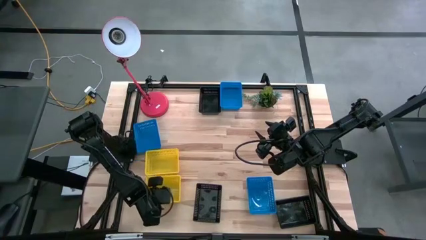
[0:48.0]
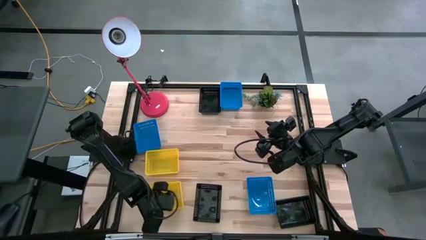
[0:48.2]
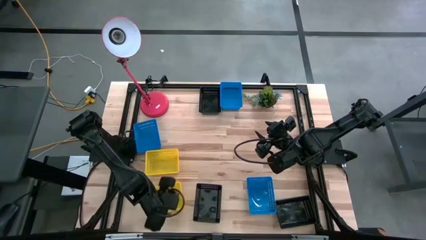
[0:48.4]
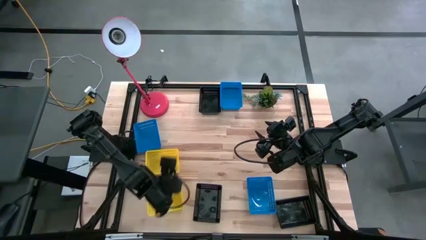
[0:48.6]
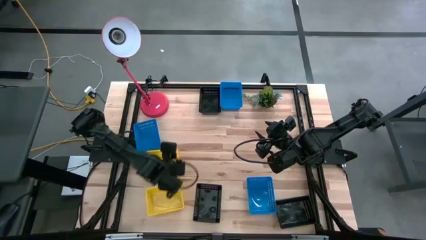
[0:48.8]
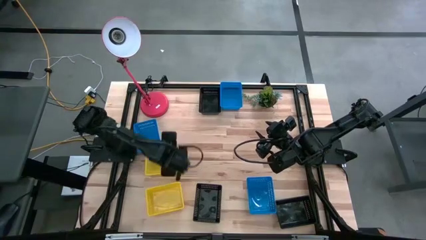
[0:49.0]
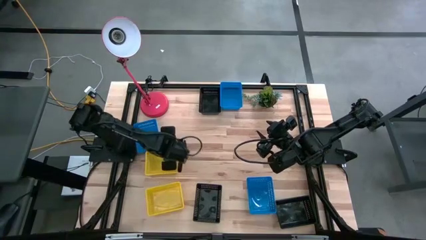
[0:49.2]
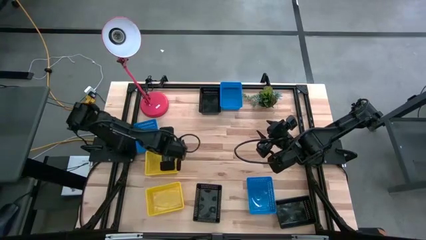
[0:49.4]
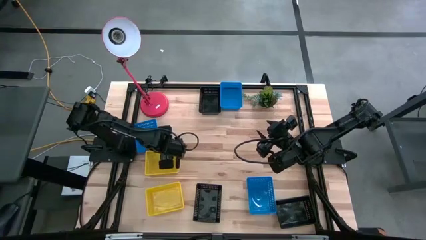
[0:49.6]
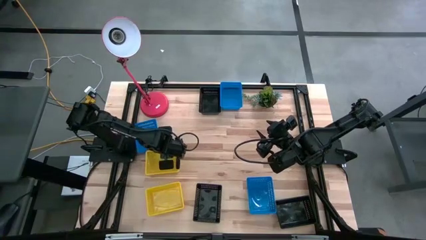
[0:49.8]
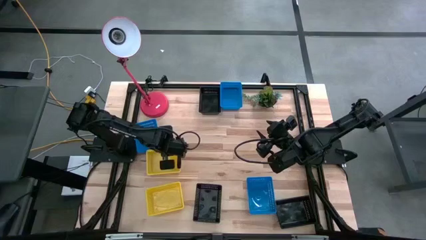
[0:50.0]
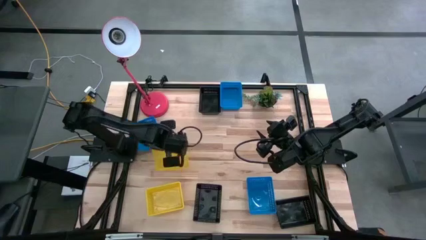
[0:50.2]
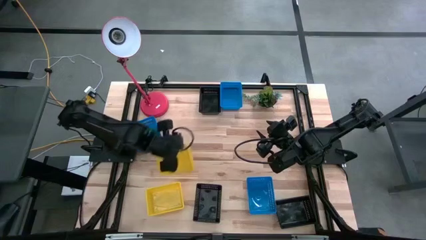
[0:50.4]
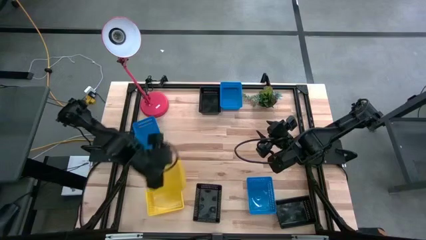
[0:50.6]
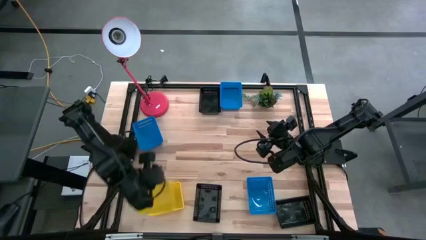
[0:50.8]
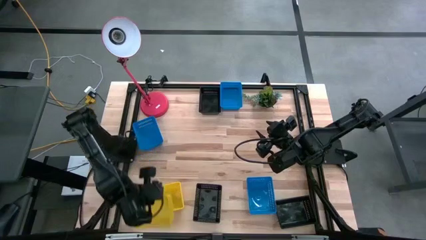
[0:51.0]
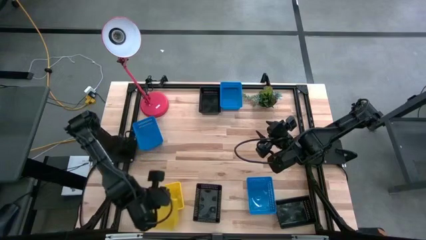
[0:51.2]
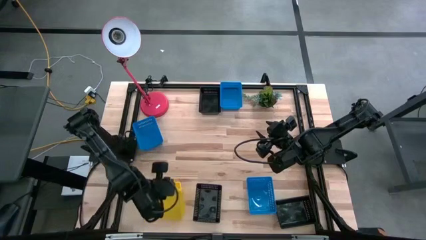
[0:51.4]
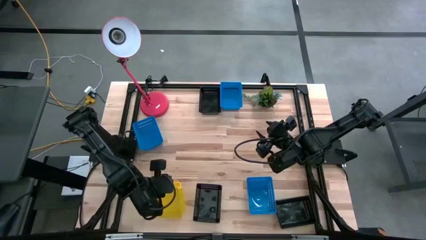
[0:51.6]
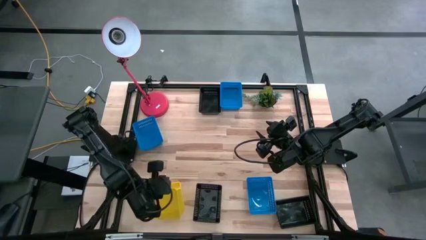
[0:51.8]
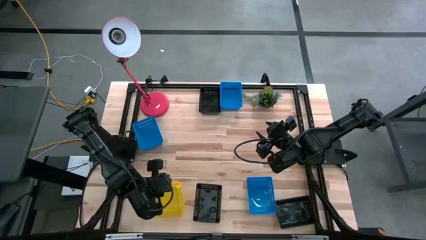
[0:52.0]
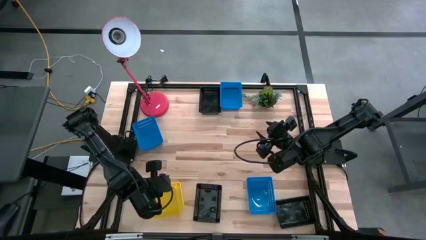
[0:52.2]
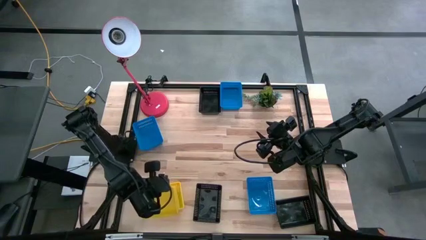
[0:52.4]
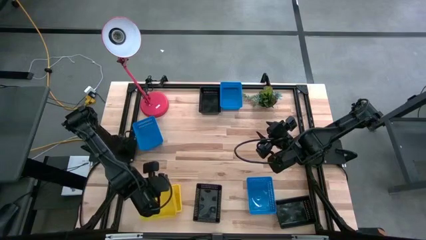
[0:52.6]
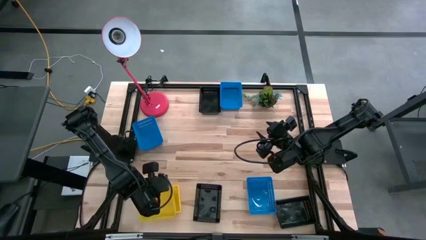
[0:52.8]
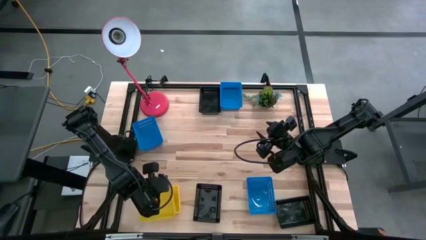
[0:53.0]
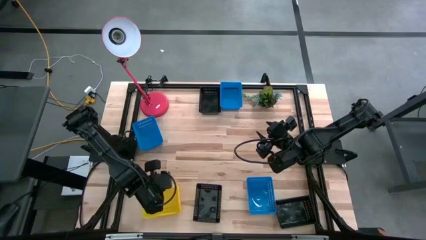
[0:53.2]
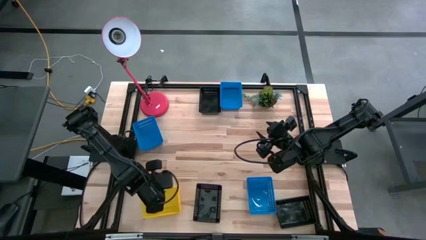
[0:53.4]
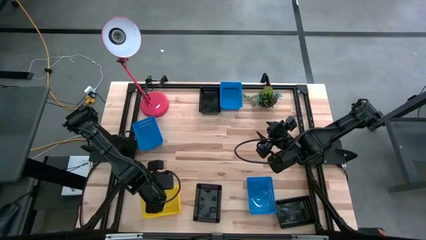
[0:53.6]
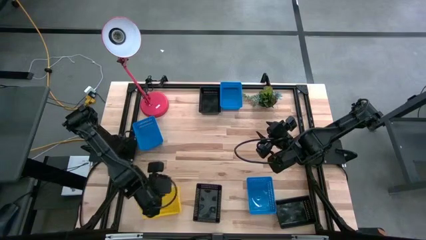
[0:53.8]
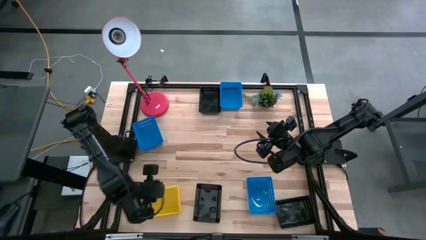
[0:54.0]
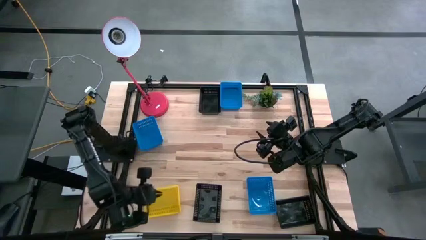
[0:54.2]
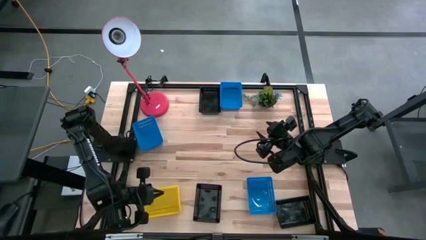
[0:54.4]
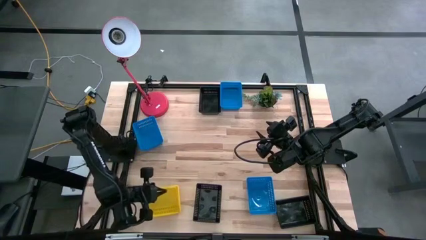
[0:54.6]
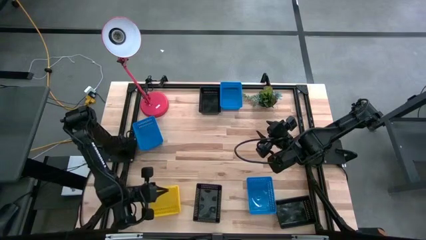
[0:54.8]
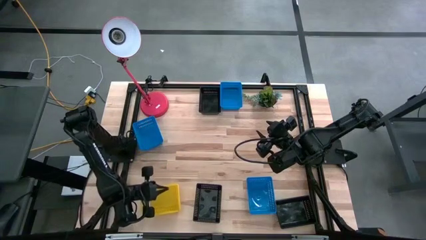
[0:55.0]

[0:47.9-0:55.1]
Stack the top yellow bin on the bottom stacked yellow bins

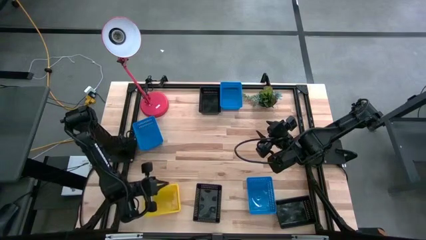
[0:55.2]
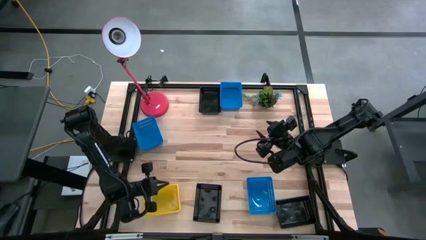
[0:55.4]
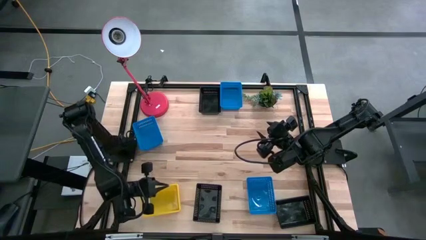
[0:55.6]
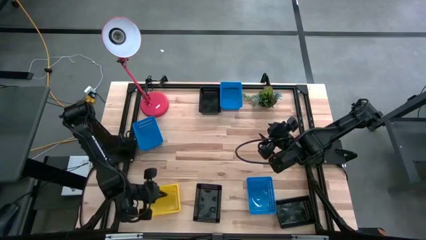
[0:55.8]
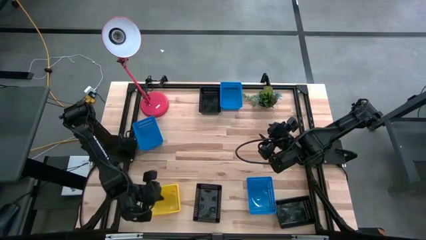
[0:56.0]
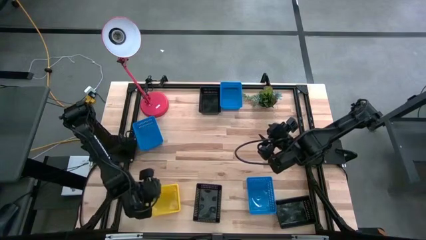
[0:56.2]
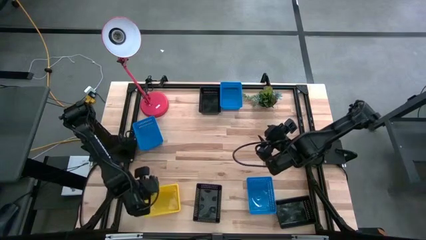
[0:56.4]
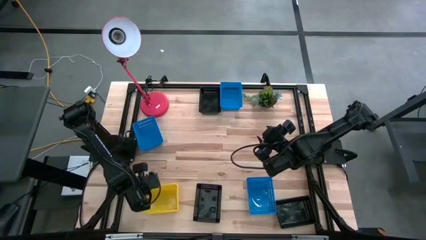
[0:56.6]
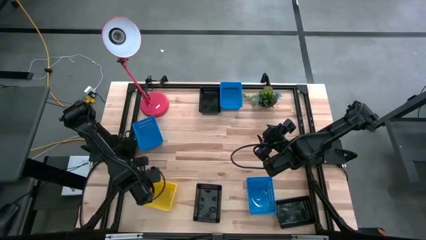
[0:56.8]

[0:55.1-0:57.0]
Adjust the stacked yellow bins

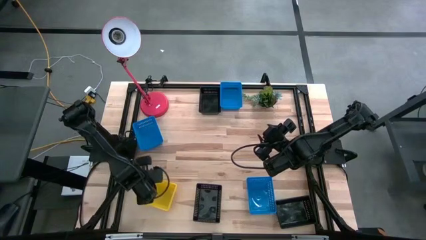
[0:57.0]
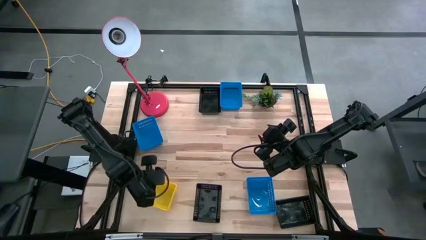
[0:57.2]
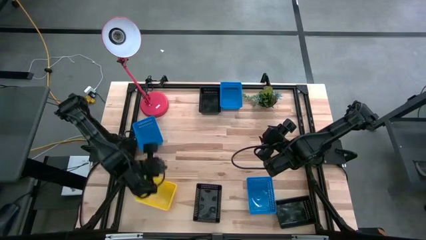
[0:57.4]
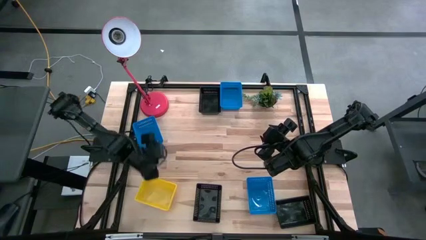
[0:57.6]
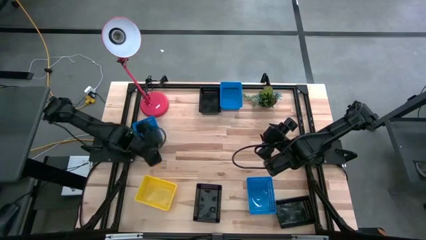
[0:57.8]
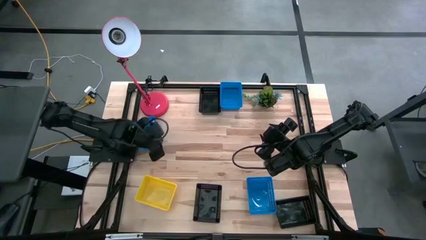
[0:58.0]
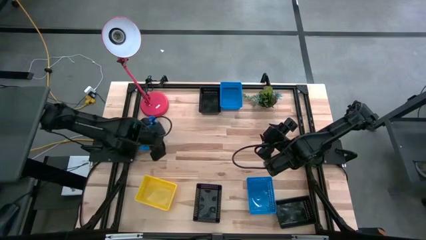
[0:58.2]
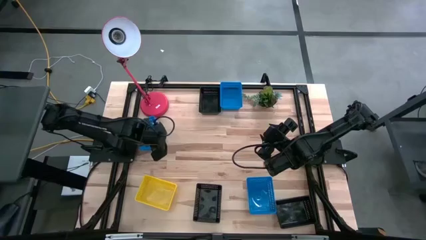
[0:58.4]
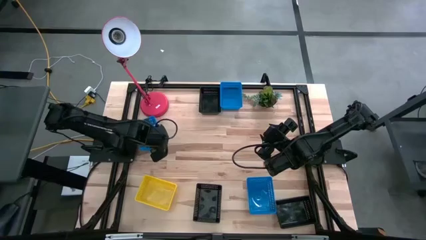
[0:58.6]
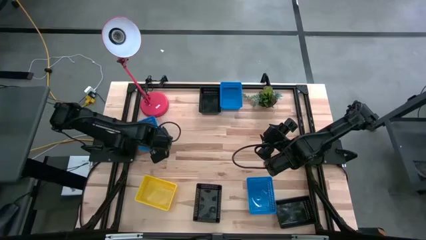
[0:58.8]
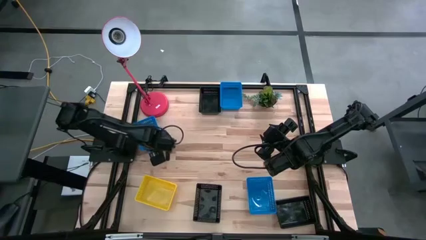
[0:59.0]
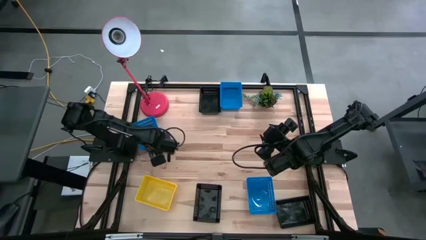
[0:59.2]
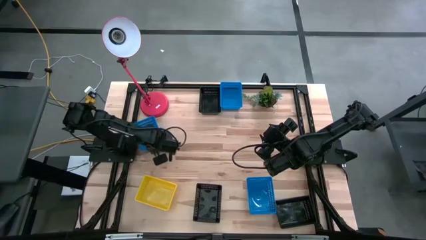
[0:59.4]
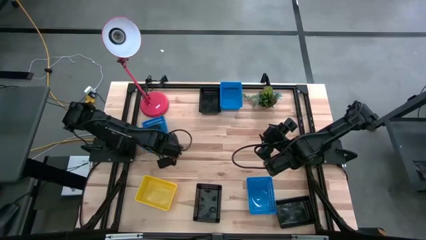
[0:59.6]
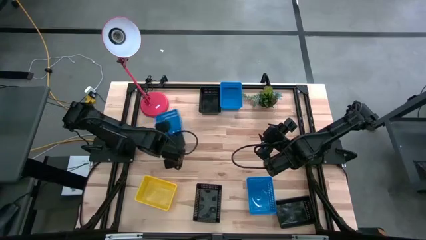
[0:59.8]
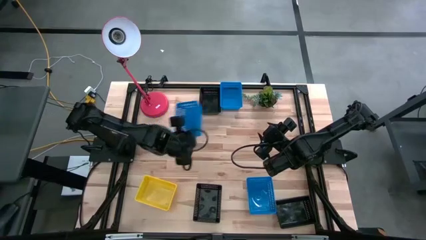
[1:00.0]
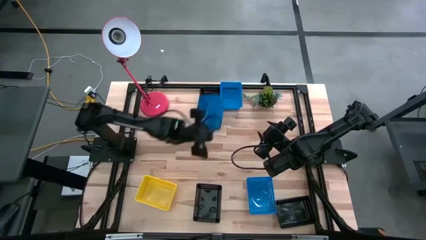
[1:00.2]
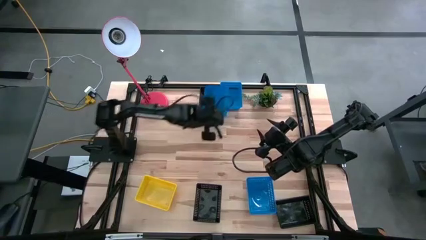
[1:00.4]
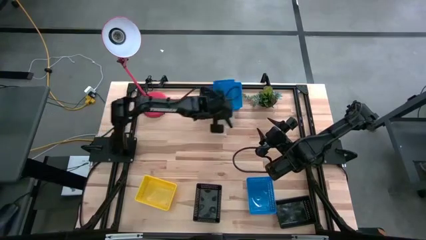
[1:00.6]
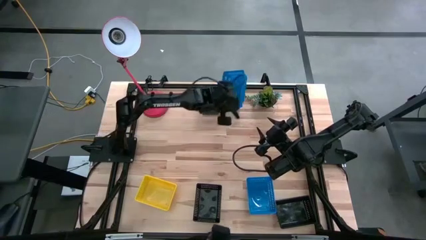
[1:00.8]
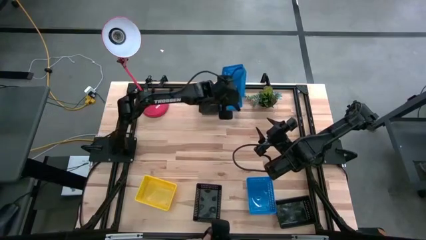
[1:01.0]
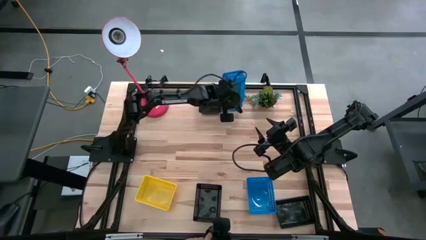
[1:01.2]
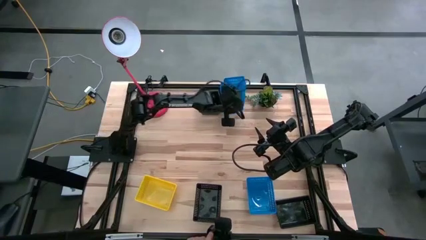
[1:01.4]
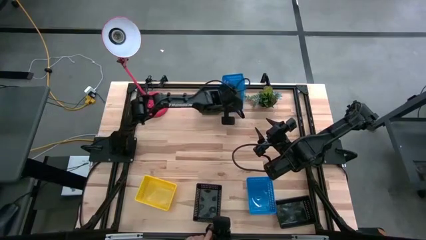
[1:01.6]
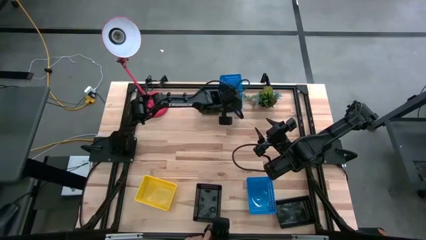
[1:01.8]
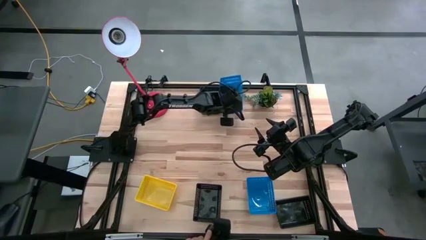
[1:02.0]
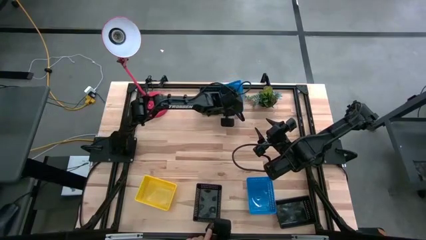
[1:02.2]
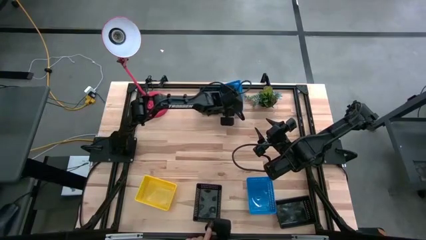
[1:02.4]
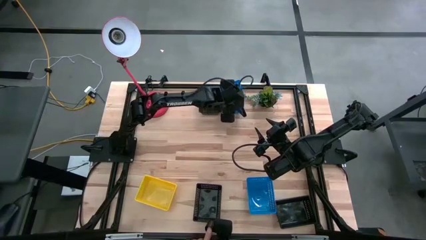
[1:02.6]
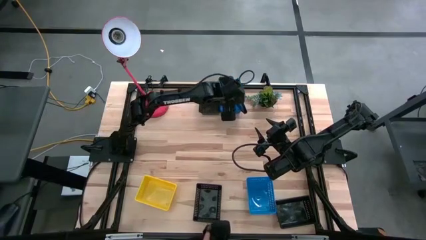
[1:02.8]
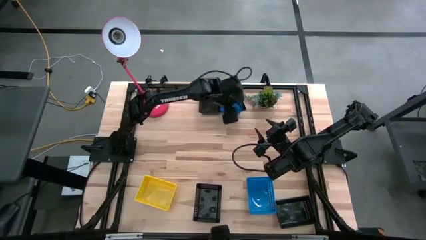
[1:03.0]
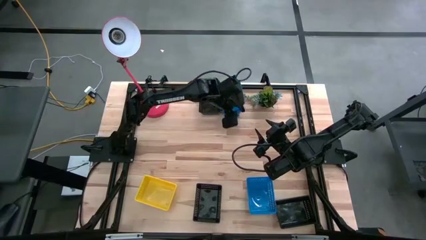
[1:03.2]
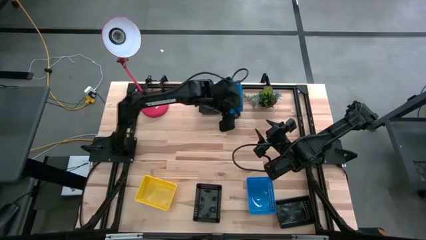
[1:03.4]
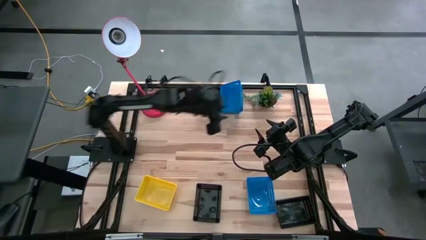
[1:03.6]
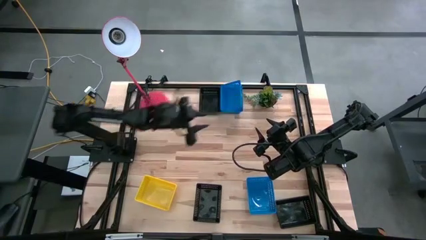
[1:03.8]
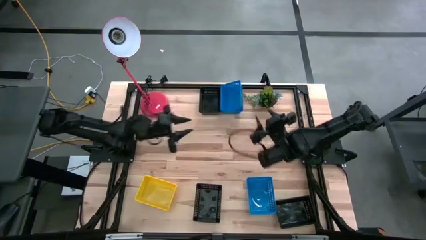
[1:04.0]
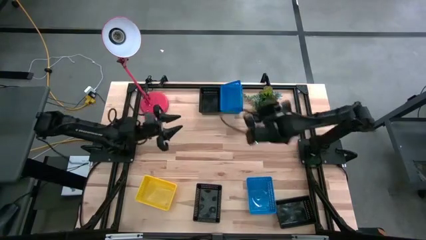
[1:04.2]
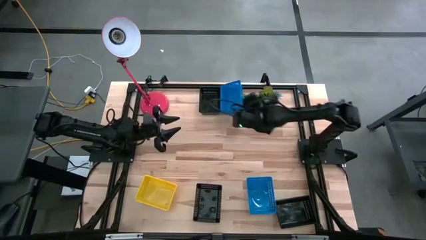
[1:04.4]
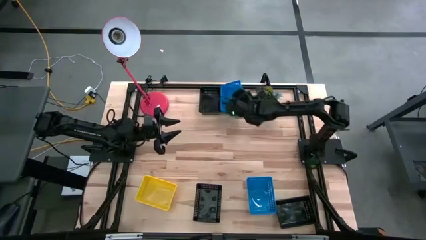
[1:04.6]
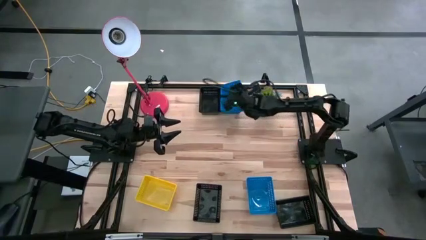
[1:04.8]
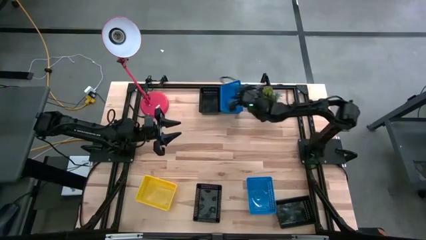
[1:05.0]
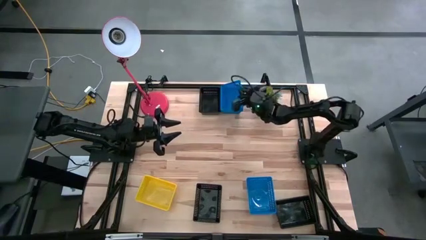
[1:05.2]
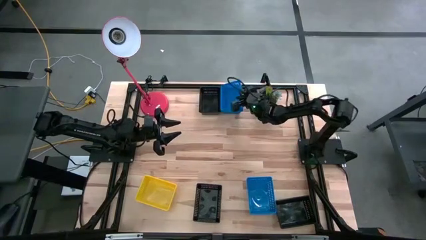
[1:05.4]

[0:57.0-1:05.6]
Stack the middle blue bin on the top blue bin
